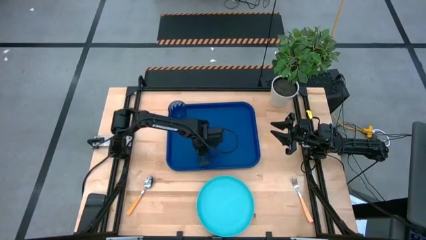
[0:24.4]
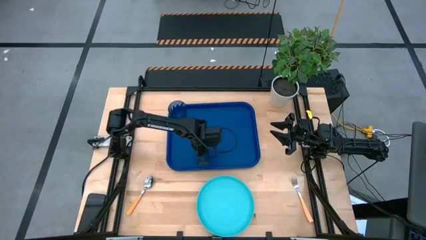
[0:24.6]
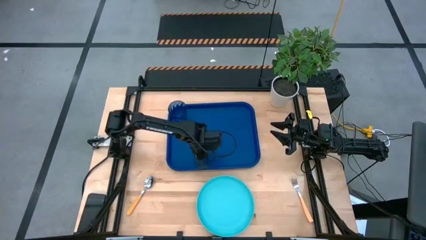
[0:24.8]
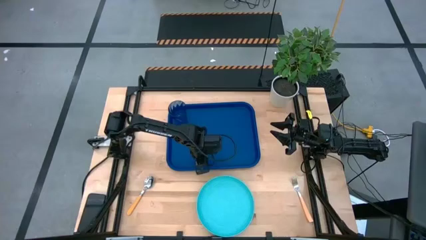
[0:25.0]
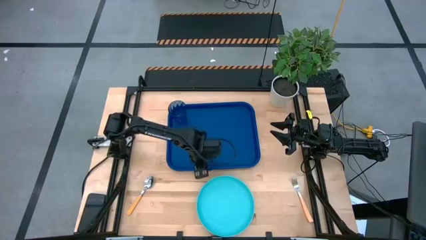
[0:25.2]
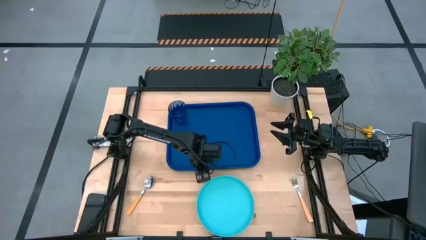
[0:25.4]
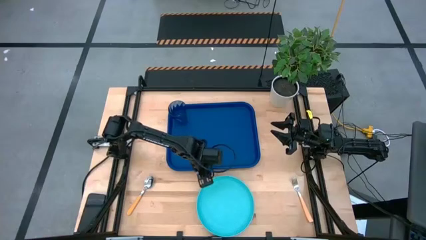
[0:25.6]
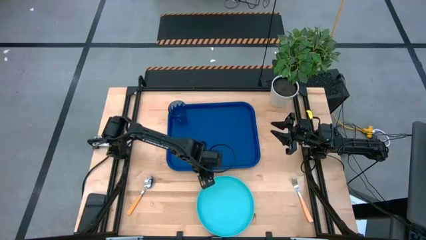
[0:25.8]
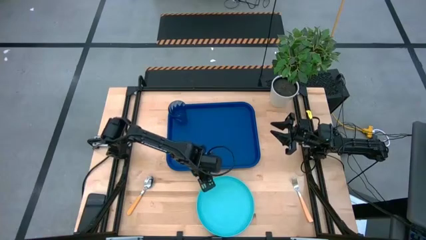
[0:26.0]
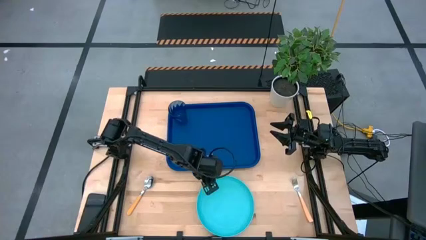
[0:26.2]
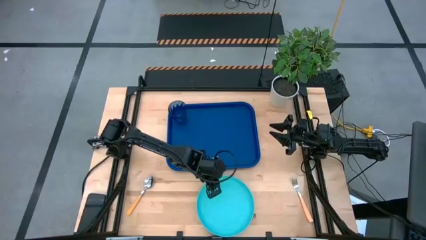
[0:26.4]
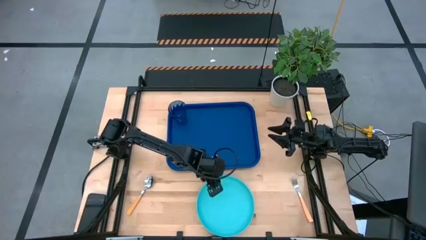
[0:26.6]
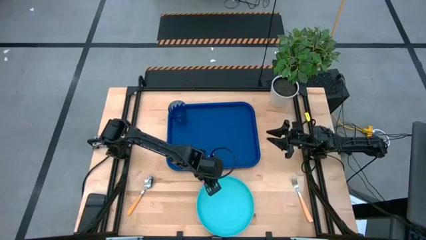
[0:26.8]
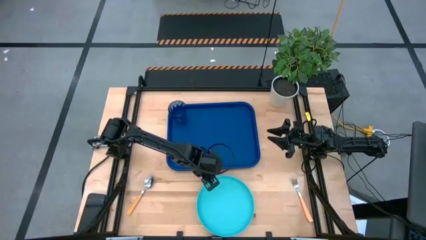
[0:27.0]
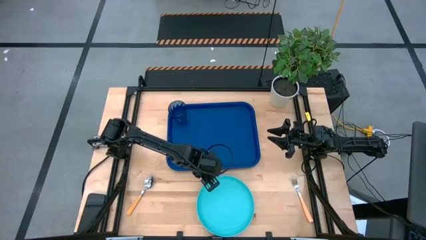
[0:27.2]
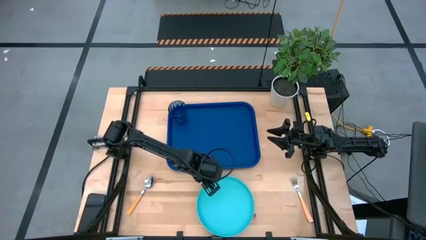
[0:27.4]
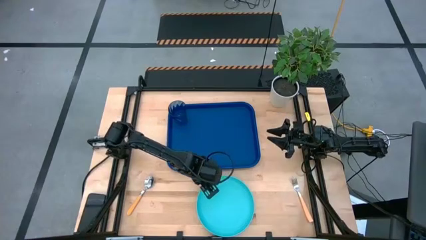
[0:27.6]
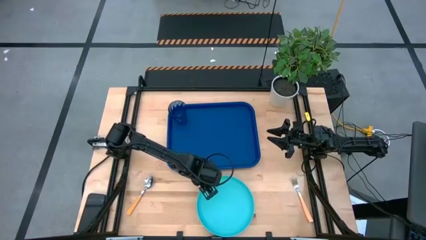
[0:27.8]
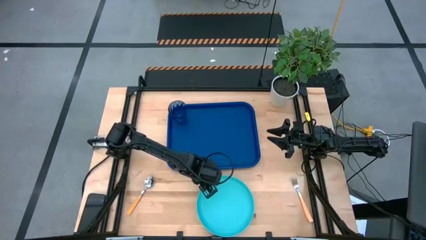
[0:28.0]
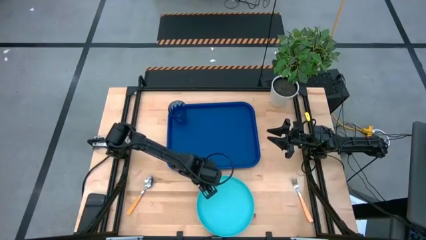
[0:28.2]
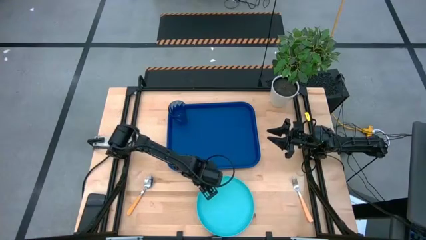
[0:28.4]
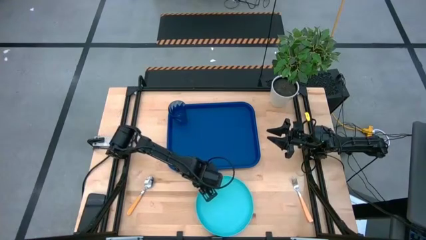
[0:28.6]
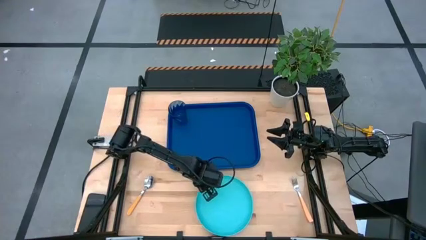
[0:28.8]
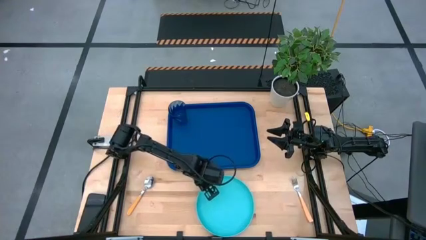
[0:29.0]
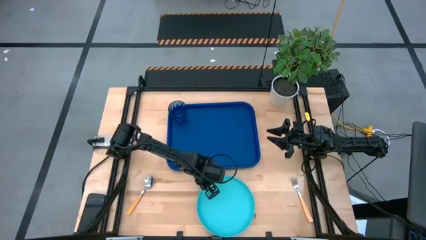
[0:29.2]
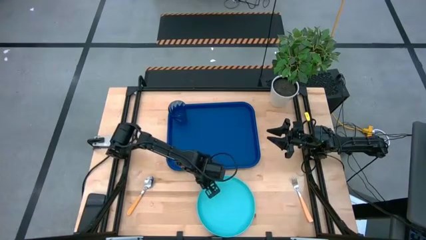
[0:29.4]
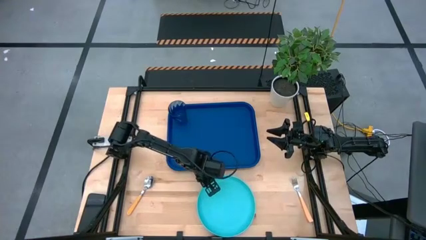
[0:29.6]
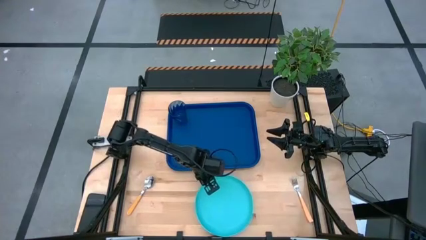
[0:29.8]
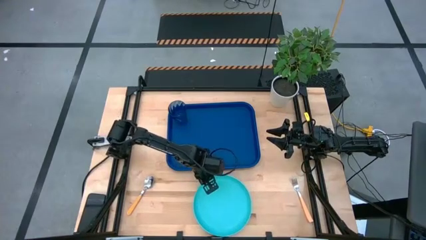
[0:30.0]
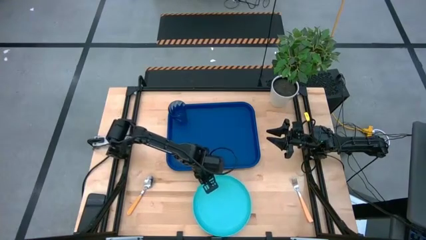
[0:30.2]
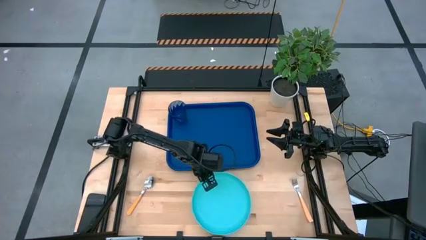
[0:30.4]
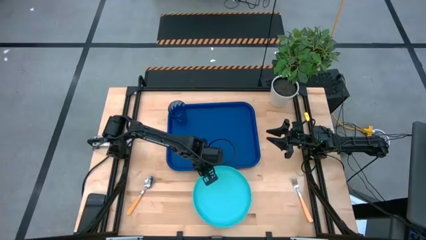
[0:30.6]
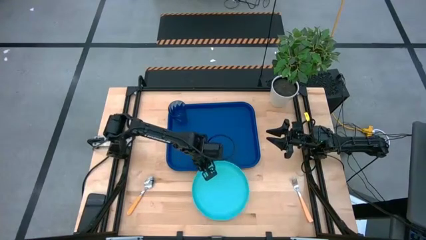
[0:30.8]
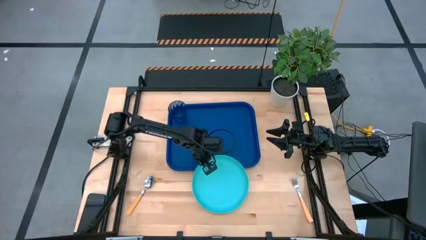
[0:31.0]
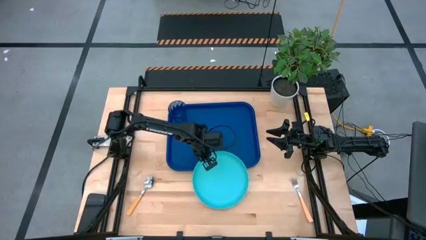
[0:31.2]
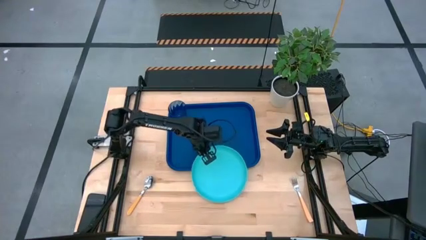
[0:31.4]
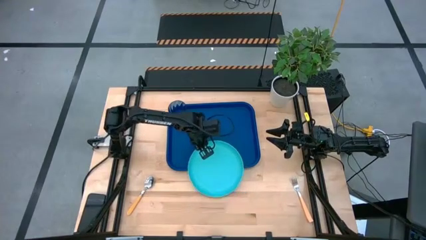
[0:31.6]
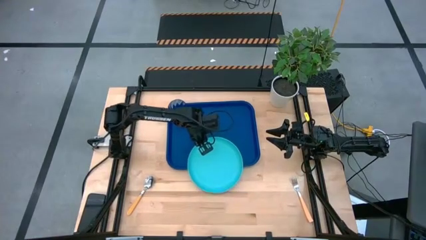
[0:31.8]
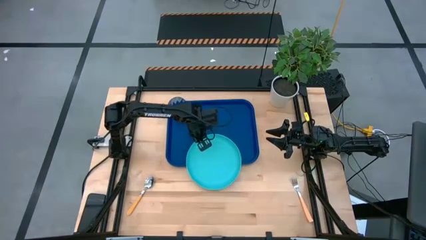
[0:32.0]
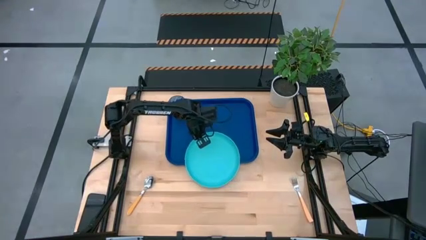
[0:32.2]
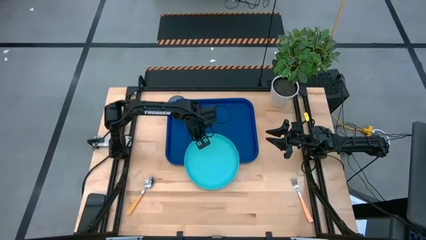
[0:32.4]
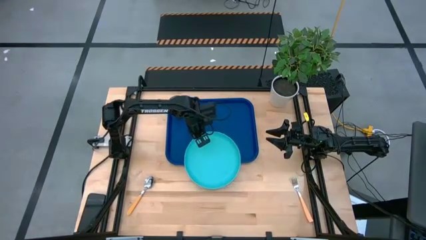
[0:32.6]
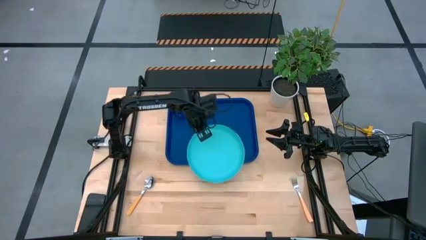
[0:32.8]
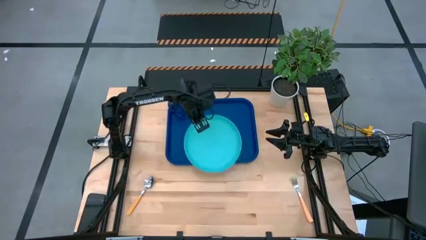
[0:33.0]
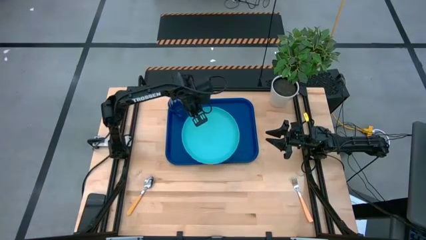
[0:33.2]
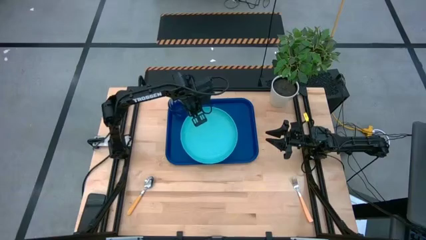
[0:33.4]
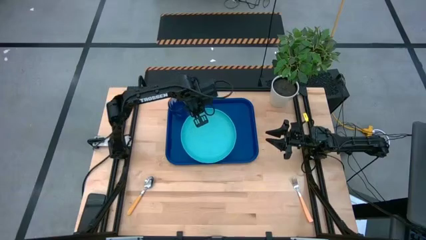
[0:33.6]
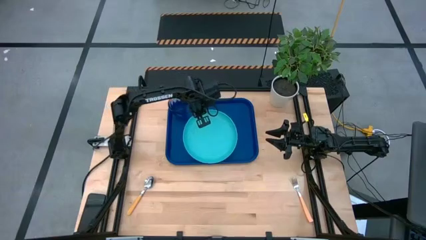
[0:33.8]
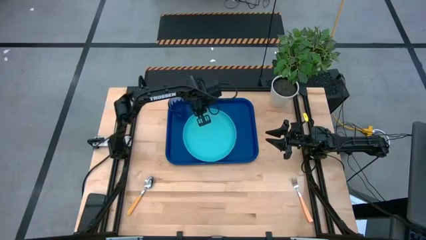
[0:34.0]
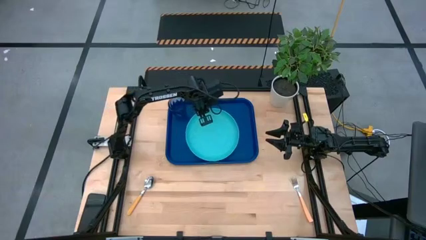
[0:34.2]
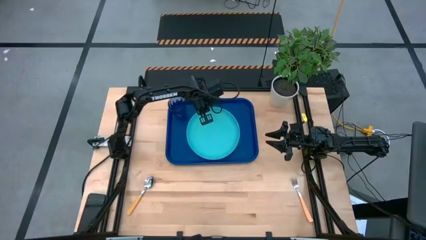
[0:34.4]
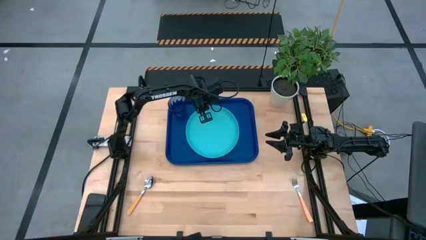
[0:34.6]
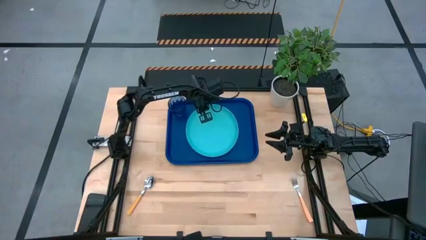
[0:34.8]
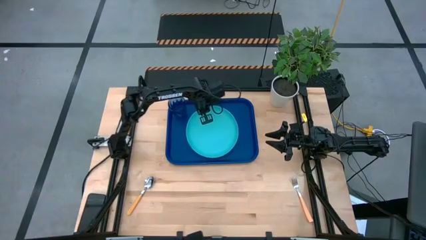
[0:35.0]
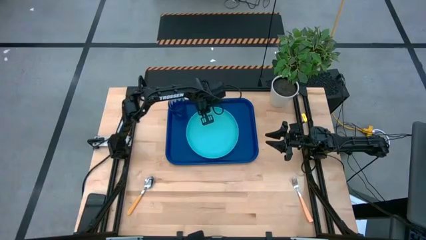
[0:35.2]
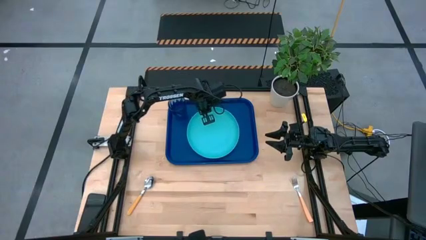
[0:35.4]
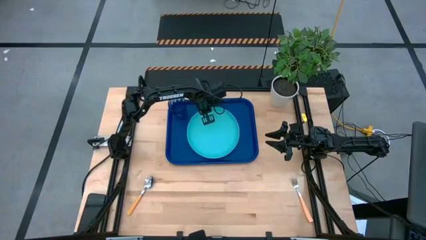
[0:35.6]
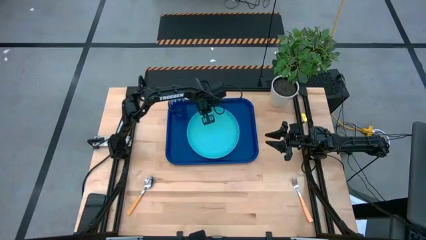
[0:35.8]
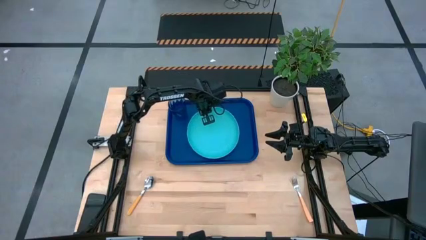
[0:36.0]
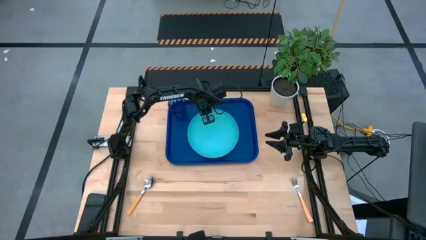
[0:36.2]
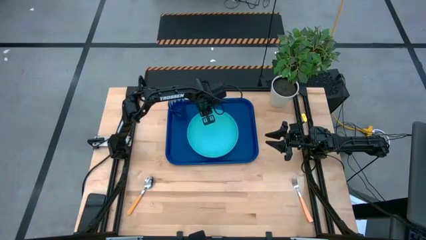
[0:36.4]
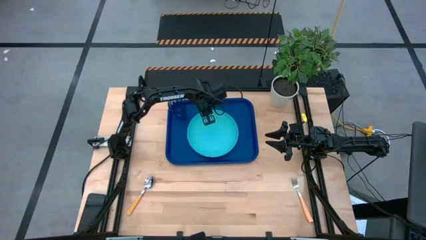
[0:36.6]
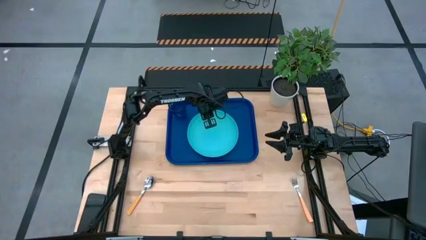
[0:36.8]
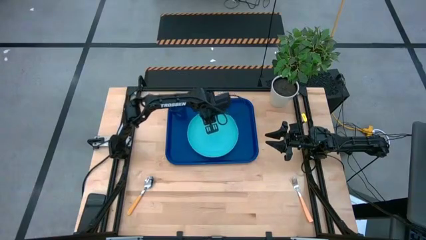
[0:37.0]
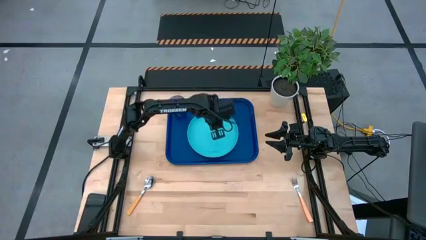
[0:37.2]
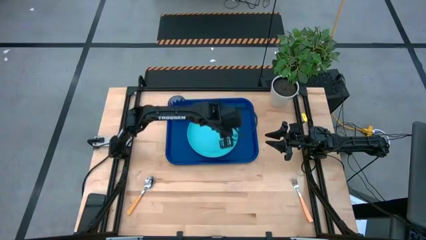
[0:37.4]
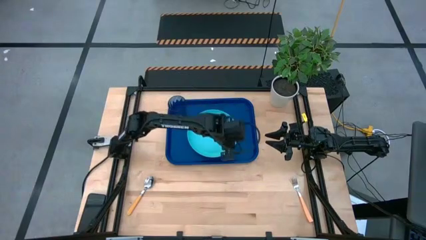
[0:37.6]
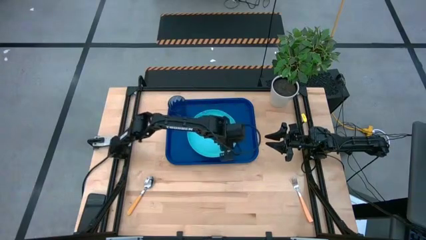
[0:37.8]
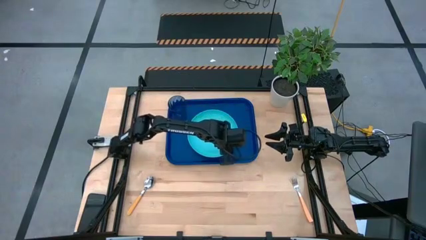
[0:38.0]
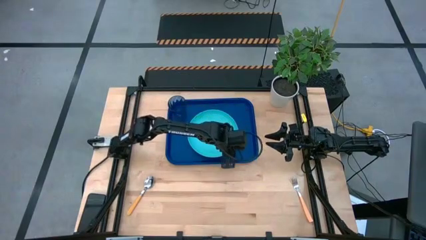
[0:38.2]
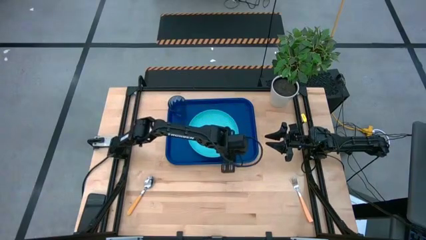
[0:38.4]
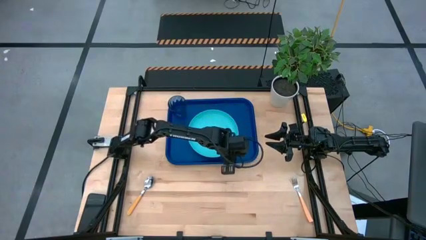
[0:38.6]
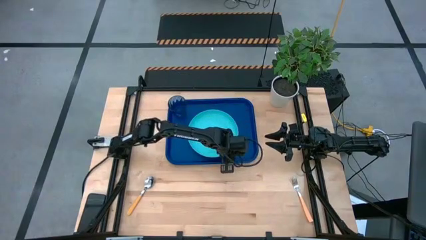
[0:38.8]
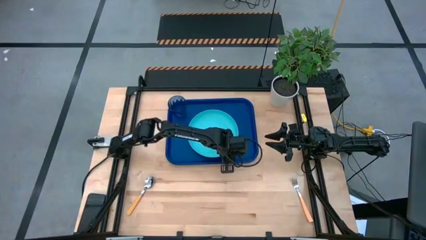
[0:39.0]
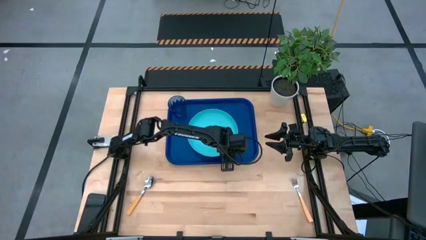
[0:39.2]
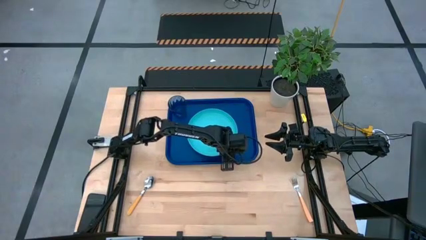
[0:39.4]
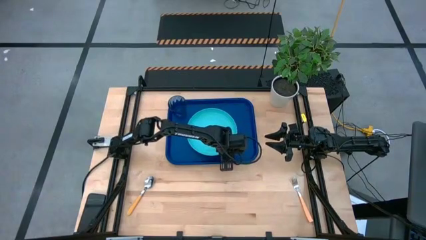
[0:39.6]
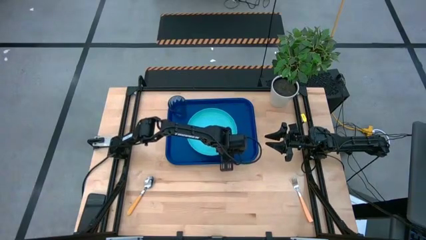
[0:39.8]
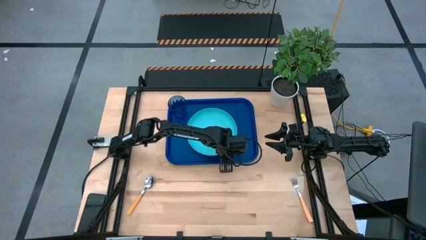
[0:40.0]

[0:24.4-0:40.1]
Task: Pick and place plate/cup/fork/spoon on tray
Put the light blue plate on the middle of the serving tray
